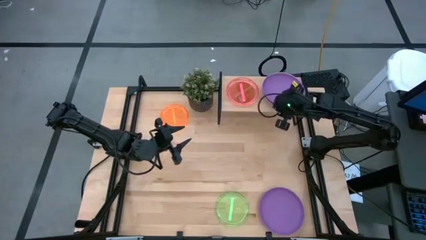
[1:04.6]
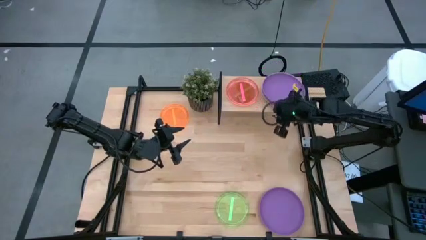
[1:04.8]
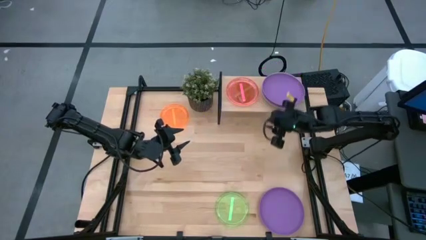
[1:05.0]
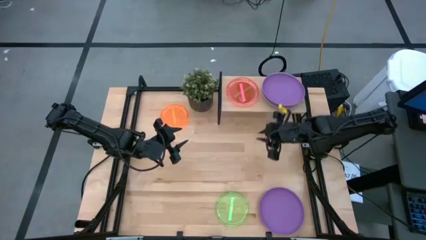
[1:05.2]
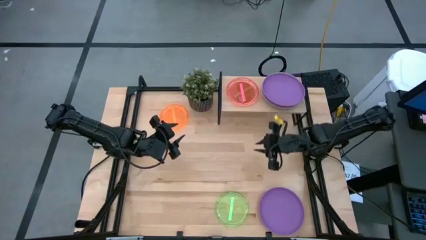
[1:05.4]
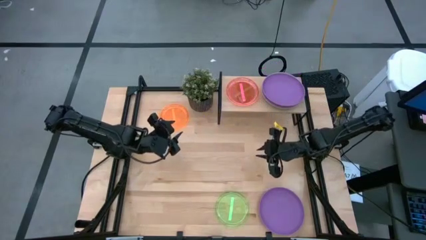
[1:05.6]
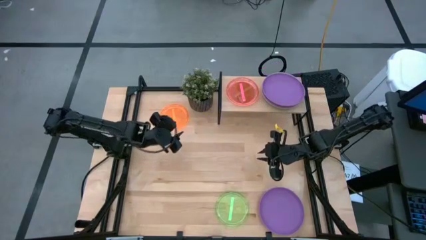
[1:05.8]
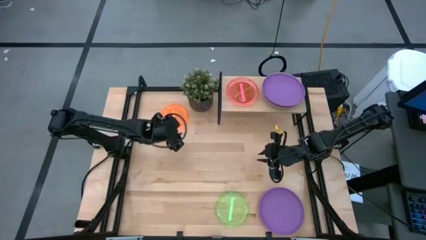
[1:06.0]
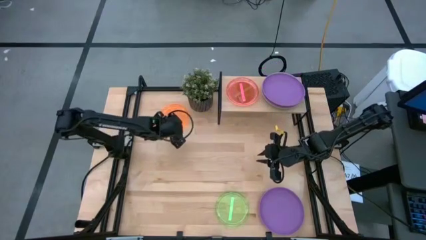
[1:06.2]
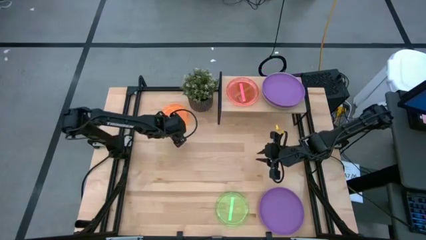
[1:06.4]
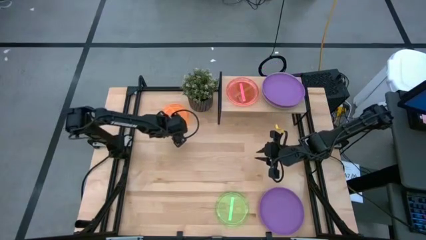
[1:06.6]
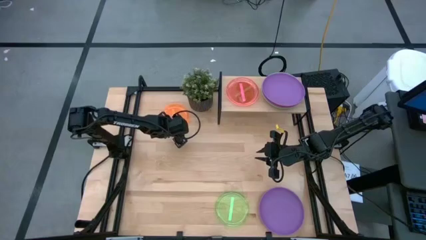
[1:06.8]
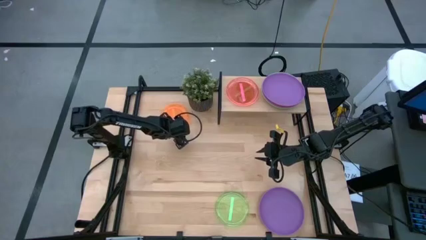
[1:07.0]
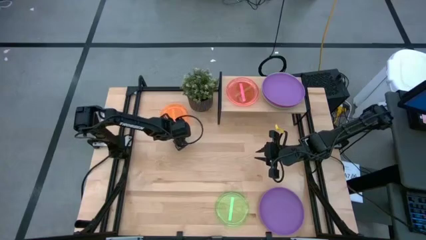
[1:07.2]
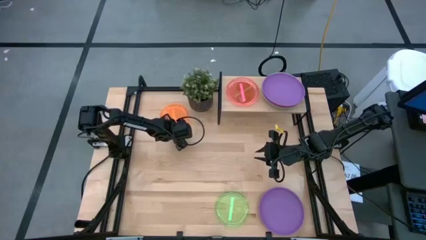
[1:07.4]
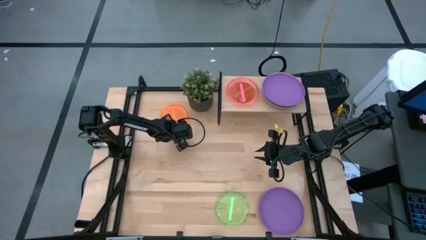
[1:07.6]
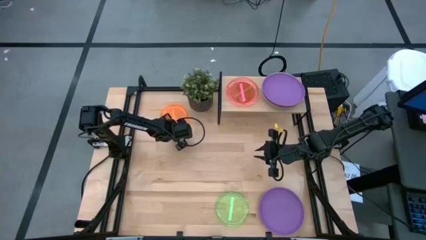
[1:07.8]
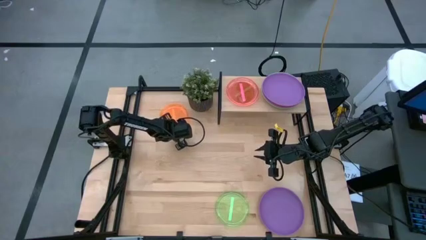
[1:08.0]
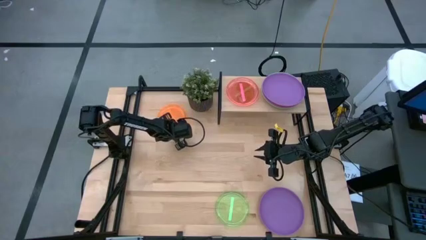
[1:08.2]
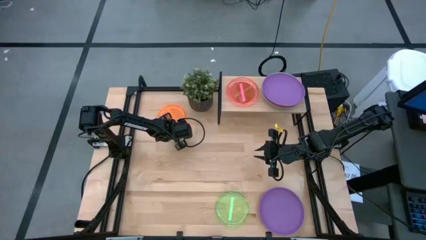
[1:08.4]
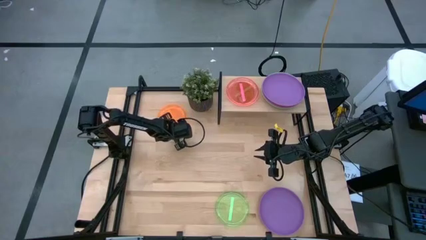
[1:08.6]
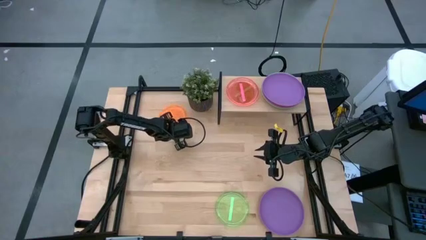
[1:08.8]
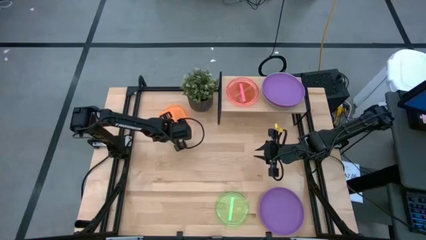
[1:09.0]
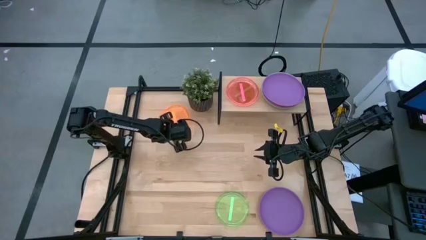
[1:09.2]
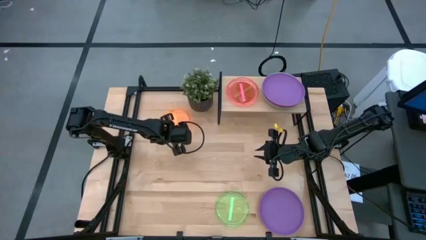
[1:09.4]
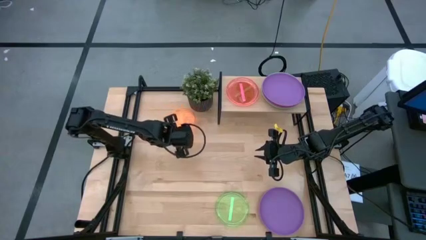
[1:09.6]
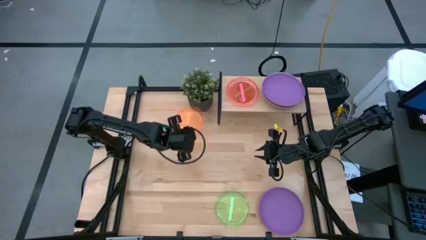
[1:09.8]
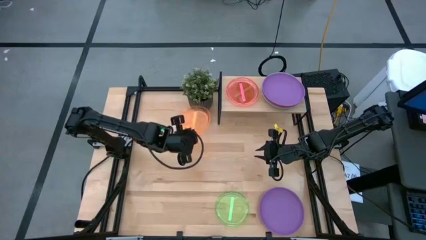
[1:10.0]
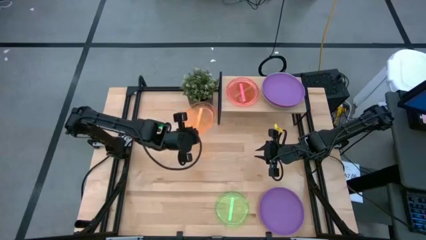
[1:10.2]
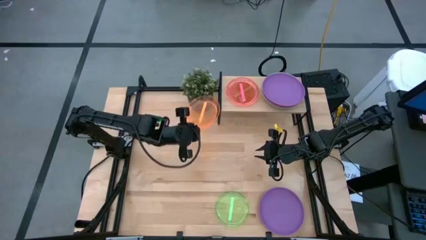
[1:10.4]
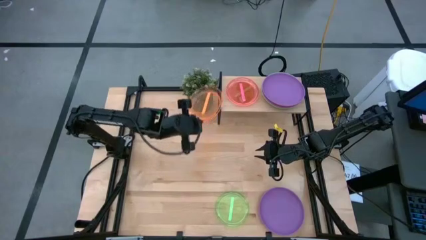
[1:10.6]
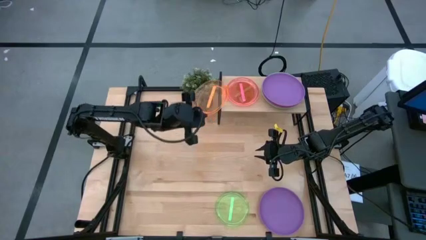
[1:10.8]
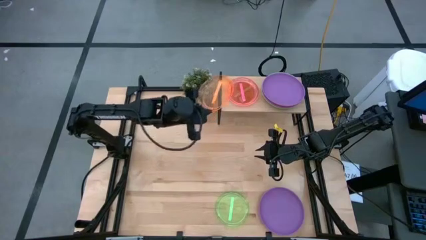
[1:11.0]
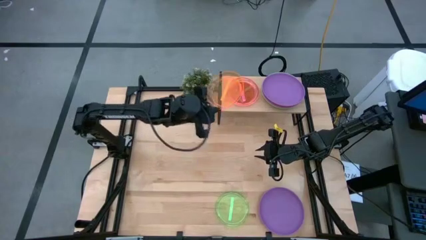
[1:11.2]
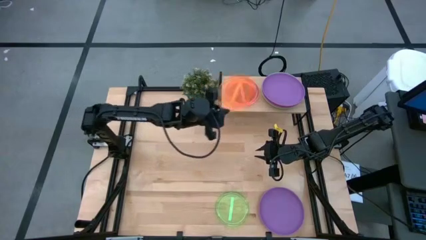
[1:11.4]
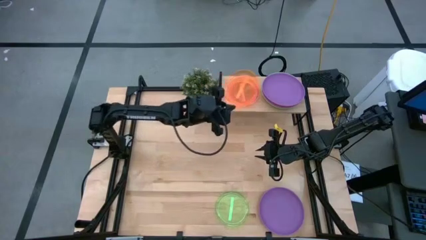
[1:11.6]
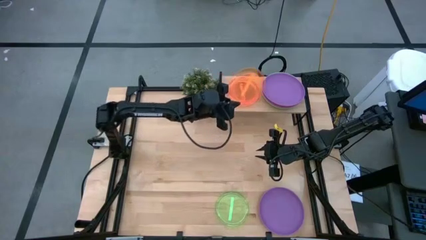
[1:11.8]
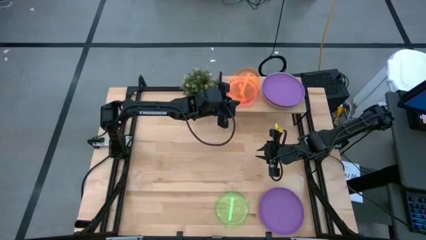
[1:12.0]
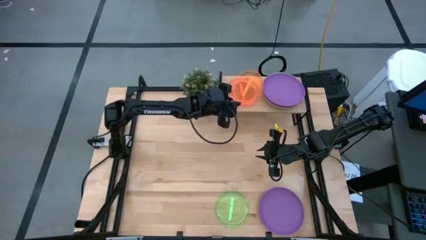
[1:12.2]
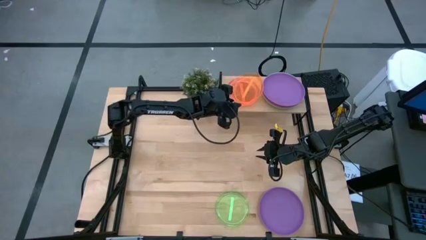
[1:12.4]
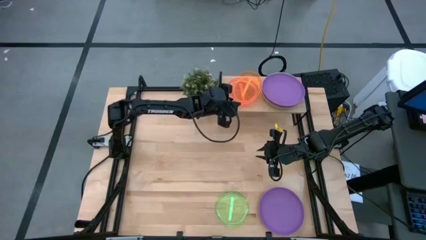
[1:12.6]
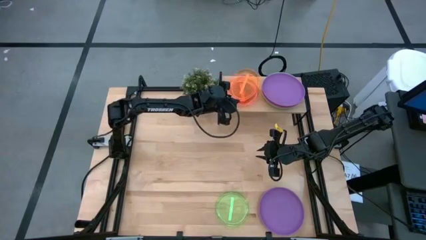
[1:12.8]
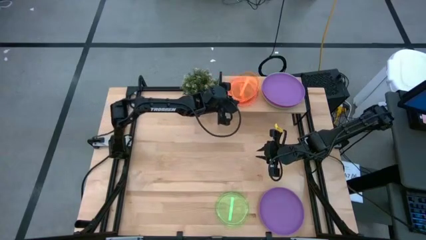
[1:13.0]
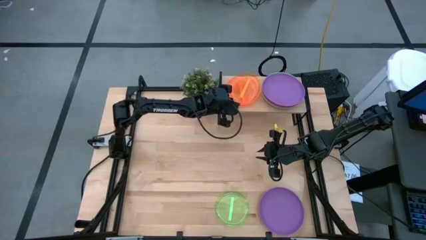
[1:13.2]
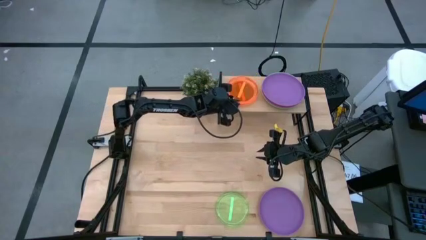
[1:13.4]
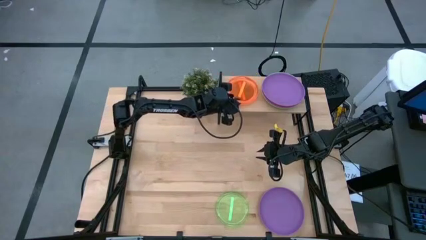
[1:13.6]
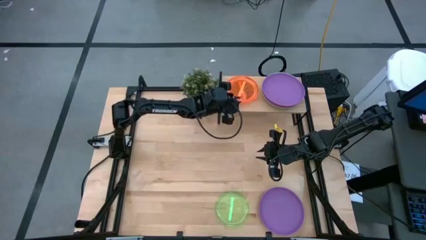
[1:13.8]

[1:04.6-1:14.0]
Task: Place and stack plates onto a shelf
Stack the light orange plate on top of the light pink plate on the shelf

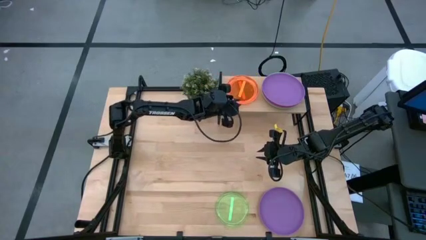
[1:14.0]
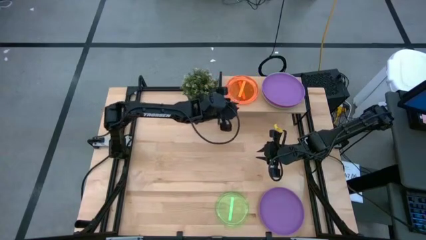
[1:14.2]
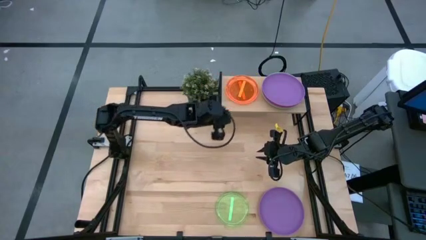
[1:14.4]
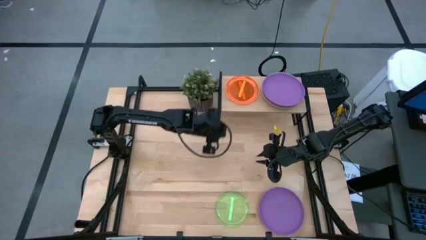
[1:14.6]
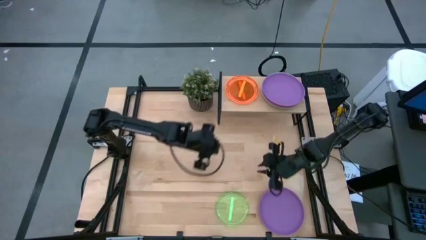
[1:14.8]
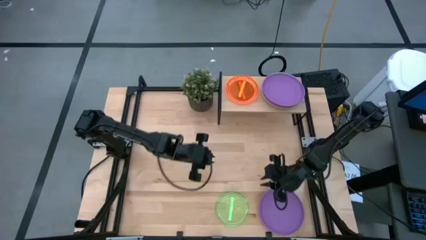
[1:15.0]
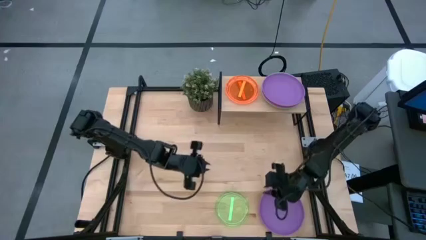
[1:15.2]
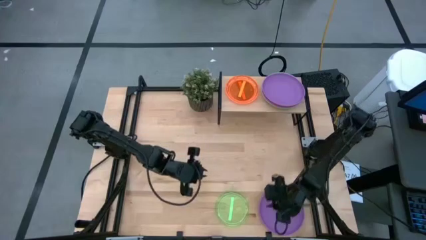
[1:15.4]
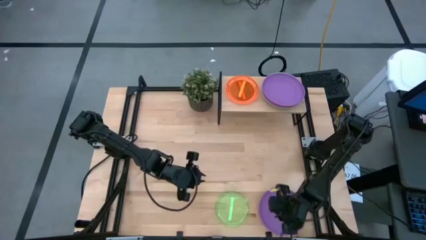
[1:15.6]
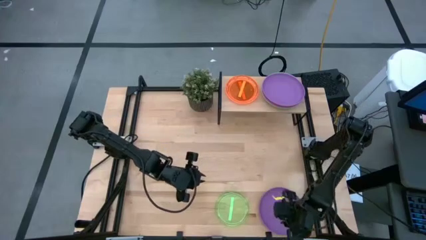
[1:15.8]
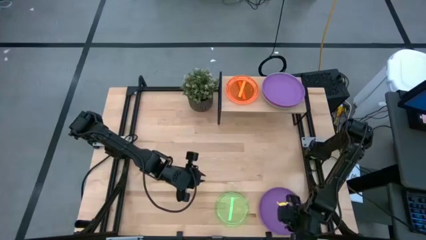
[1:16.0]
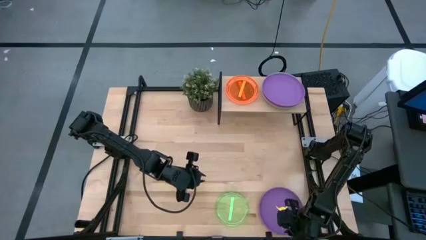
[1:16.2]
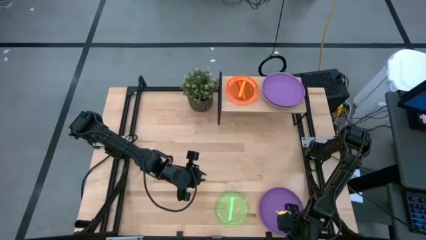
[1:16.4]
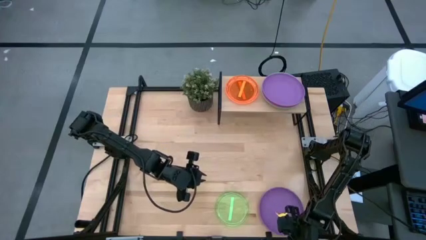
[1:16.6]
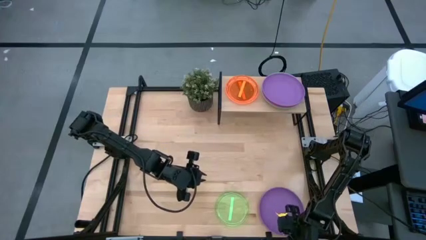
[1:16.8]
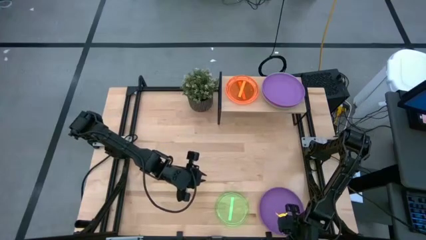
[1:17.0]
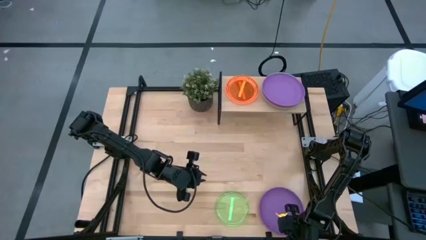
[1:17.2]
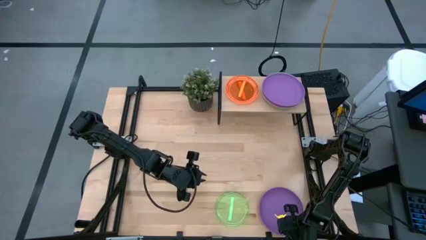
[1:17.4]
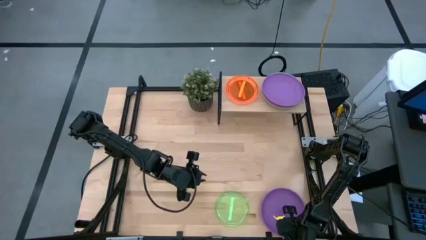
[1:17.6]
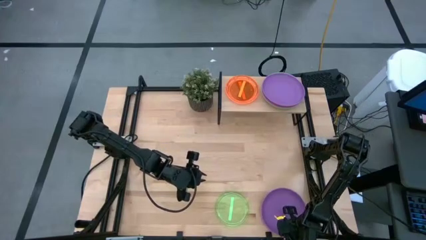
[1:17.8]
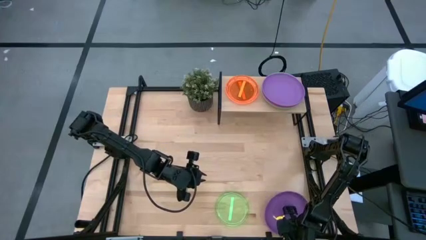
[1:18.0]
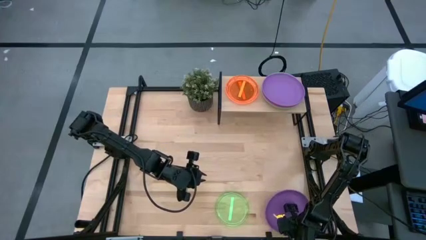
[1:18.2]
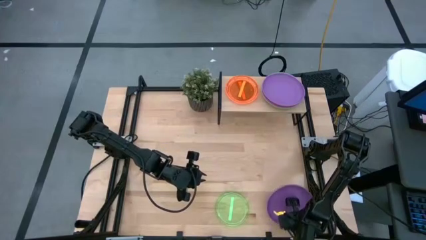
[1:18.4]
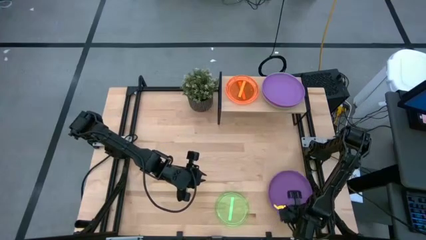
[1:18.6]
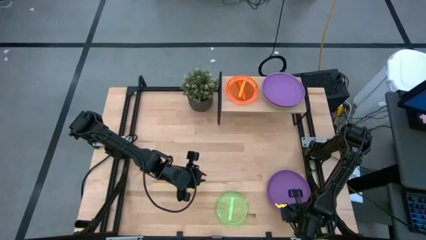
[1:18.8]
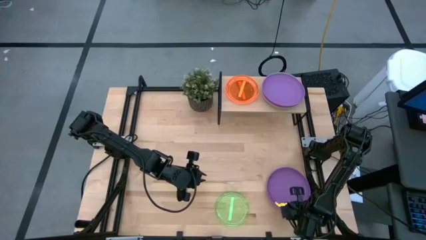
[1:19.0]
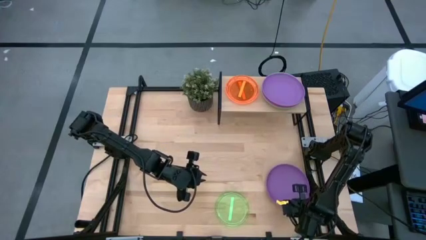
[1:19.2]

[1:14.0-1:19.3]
Stack the purple plate on top of the purple plate on the shelf

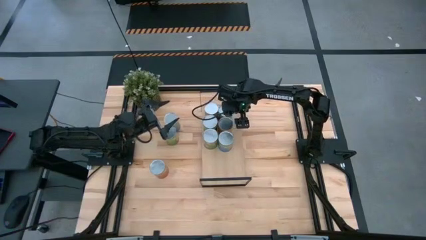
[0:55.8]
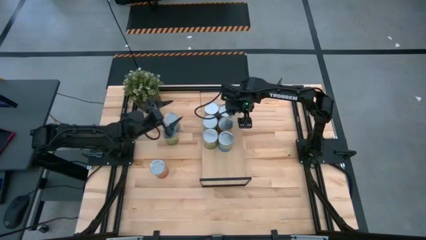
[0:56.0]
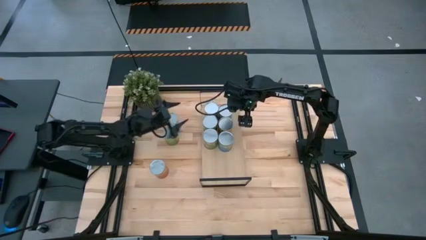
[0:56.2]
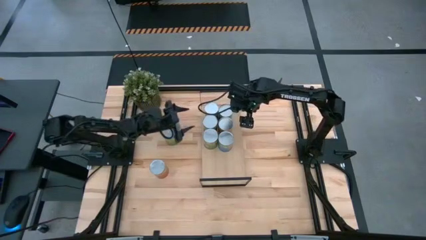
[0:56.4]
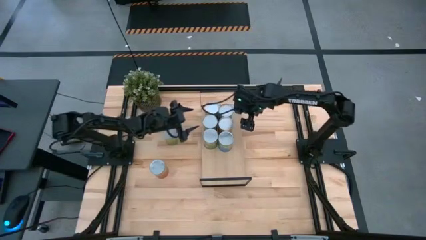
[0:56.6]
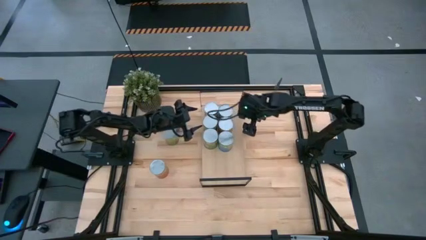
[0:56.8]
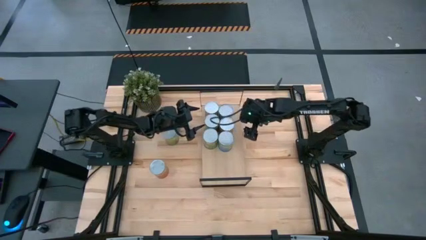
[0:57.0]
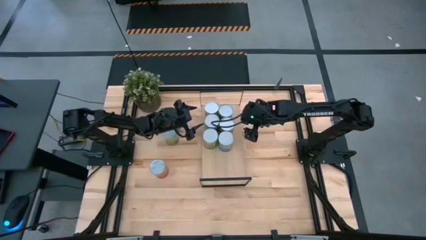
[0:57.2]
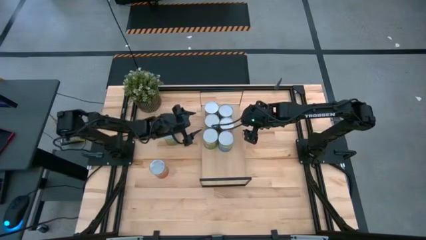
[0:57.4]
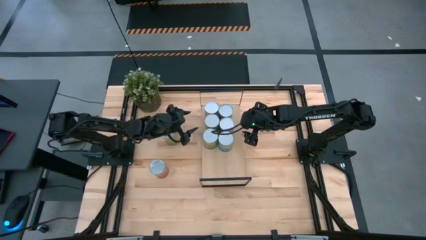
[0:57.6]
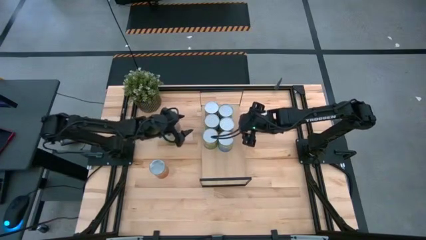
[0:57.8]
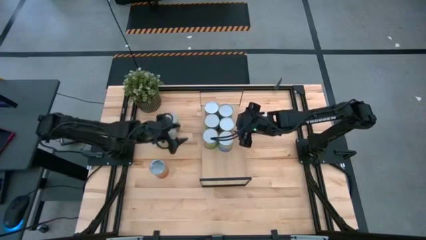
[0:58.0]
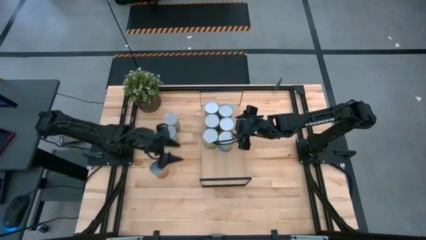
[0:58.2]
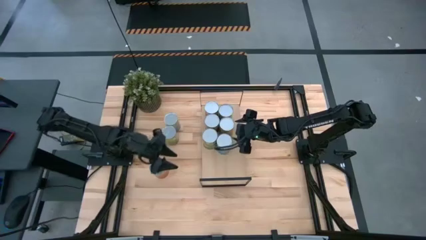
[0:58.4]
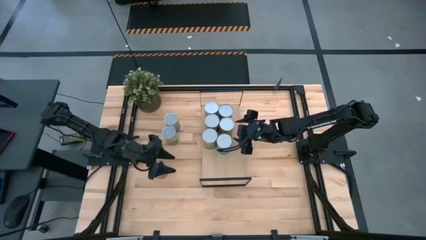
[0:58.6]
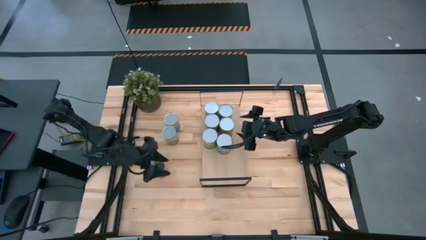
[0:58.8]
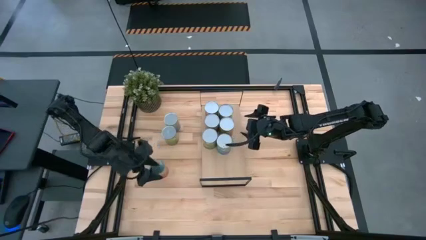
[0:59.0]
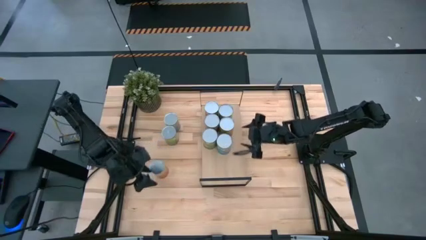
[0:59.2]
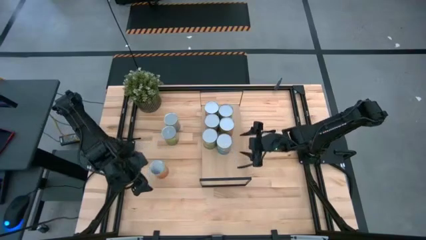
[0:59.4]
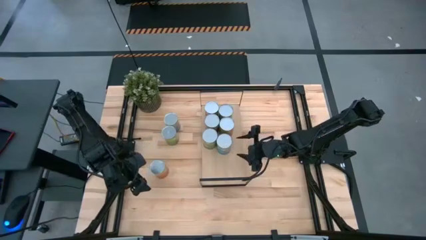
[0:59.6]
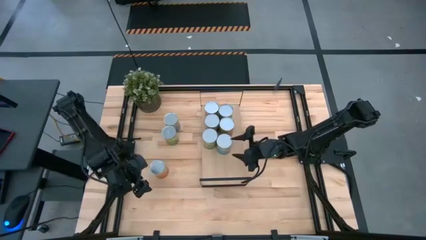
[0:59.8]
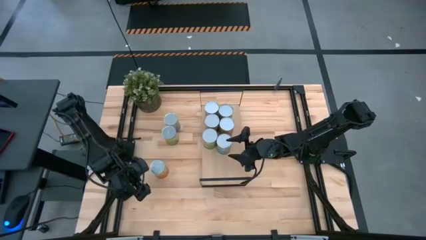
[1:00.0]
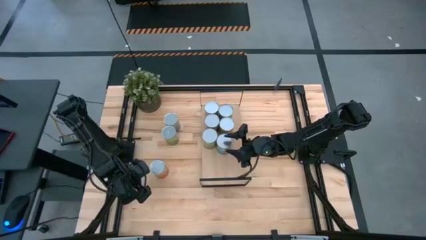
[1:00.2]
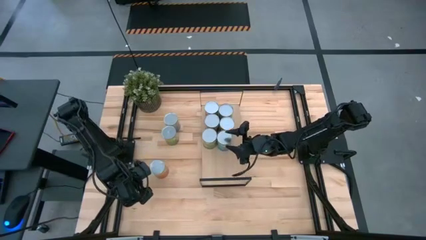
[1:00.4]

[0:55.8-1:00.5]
Task: Pick and place cans onto a shelf
Adjust the canned goods on the shelf
